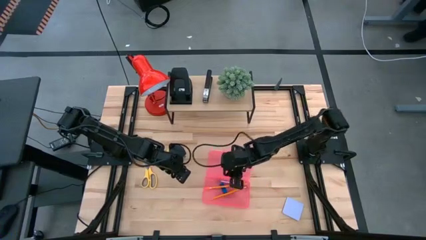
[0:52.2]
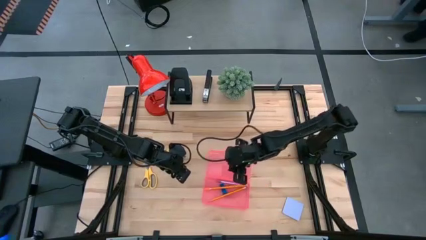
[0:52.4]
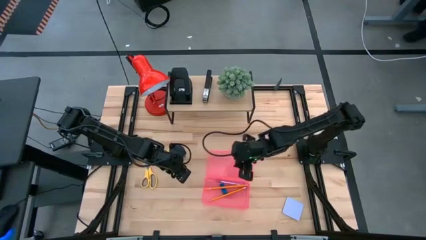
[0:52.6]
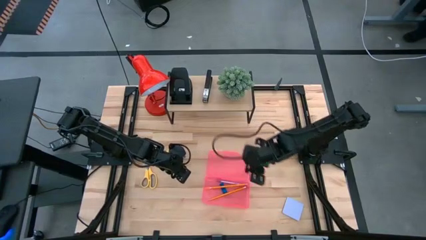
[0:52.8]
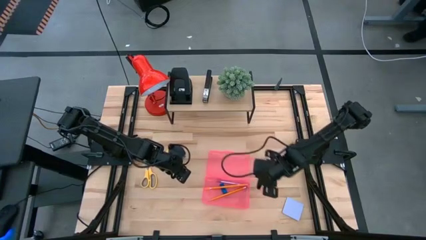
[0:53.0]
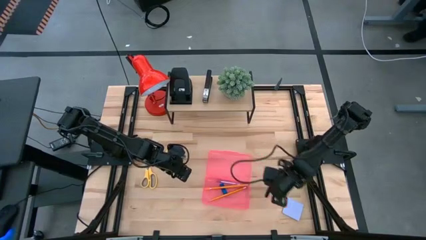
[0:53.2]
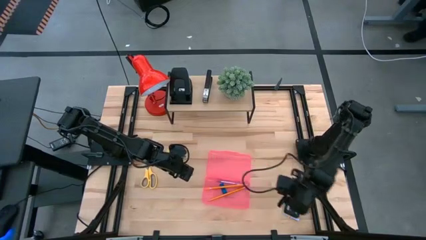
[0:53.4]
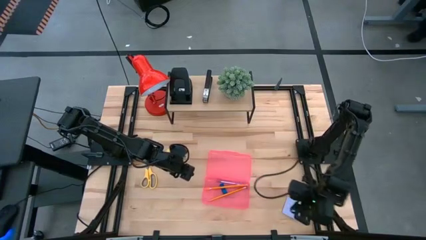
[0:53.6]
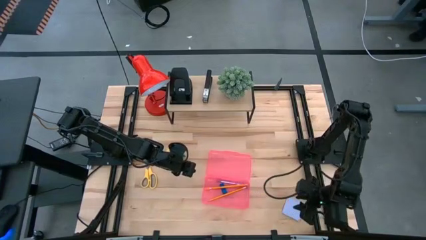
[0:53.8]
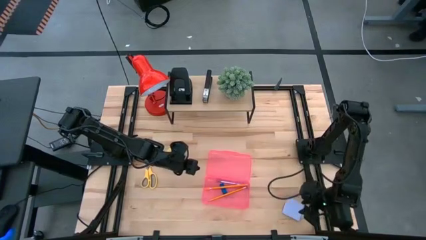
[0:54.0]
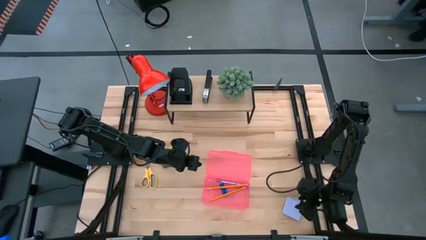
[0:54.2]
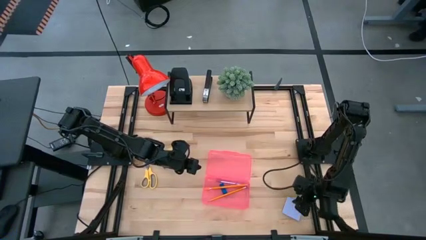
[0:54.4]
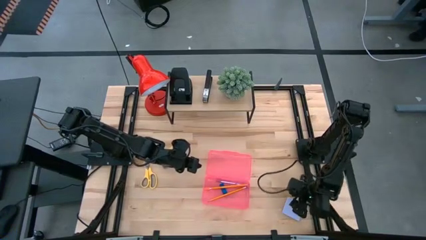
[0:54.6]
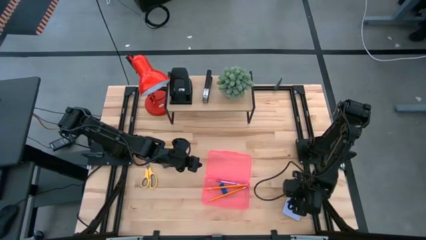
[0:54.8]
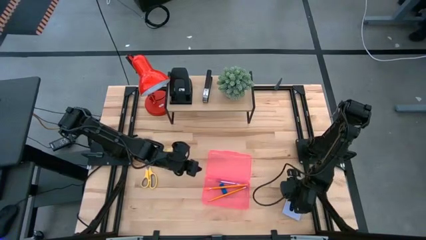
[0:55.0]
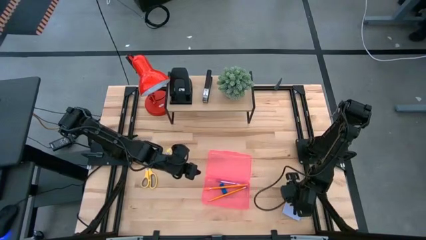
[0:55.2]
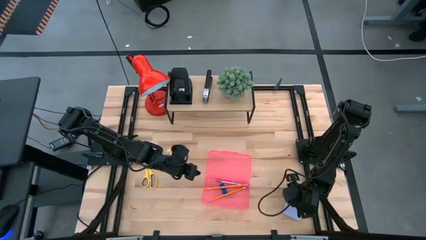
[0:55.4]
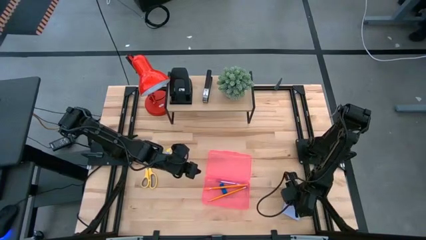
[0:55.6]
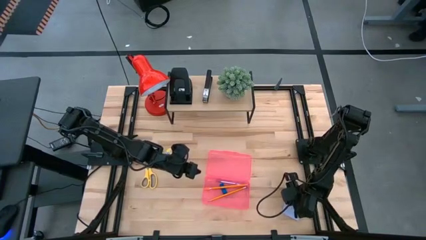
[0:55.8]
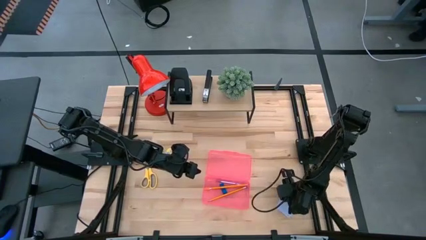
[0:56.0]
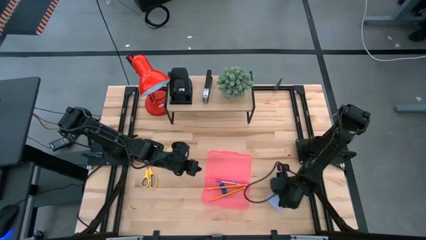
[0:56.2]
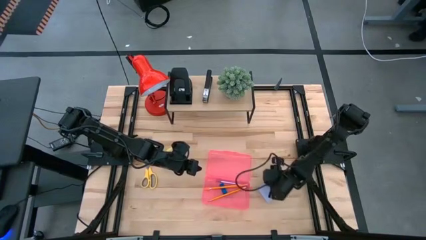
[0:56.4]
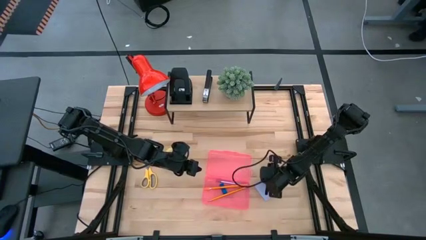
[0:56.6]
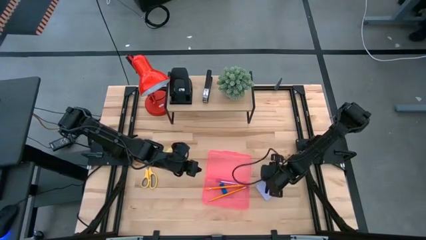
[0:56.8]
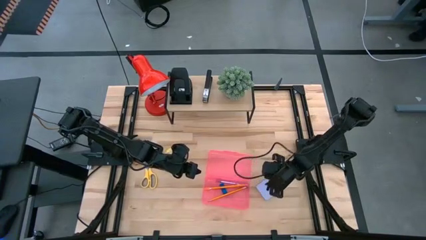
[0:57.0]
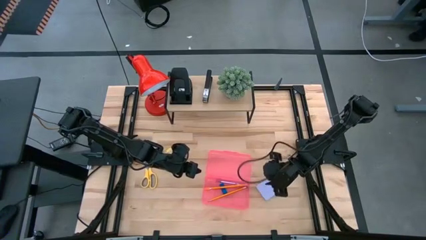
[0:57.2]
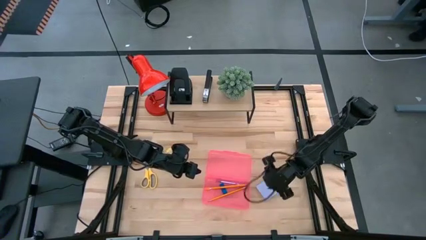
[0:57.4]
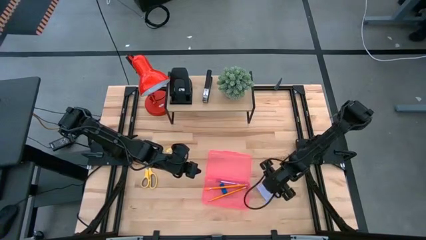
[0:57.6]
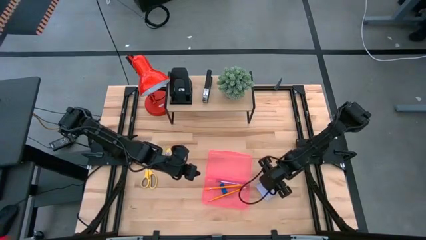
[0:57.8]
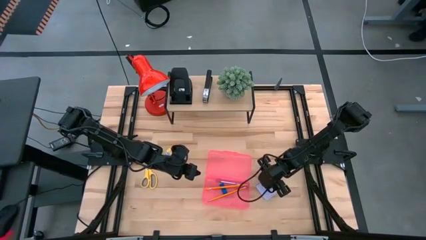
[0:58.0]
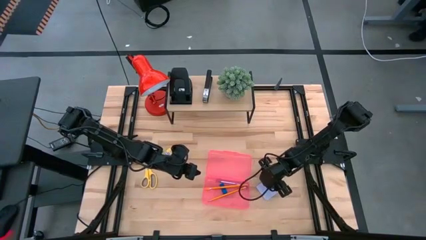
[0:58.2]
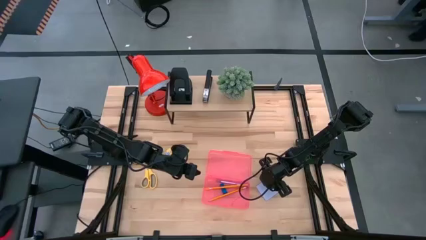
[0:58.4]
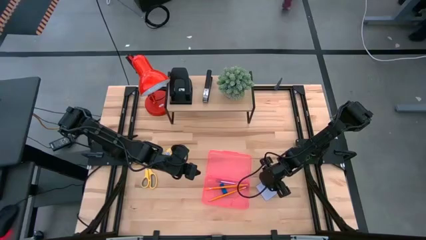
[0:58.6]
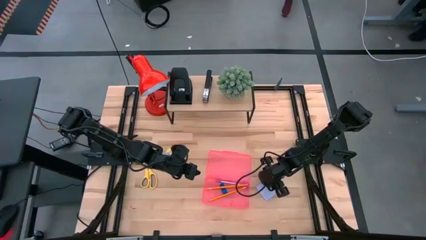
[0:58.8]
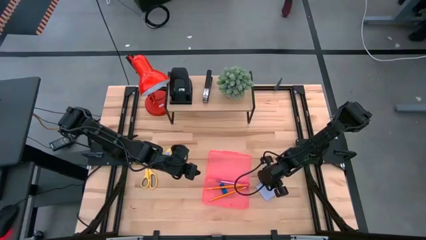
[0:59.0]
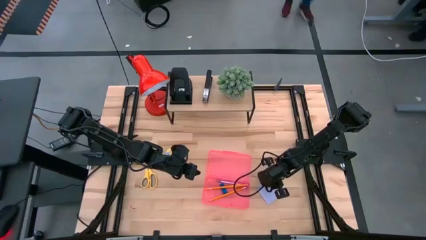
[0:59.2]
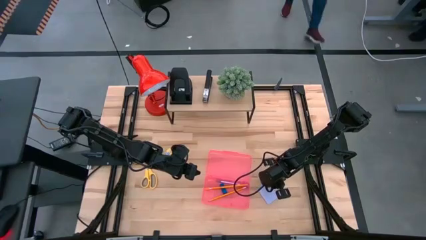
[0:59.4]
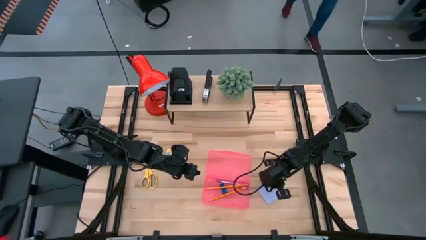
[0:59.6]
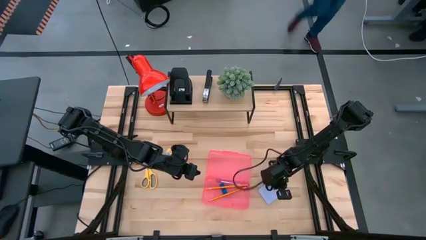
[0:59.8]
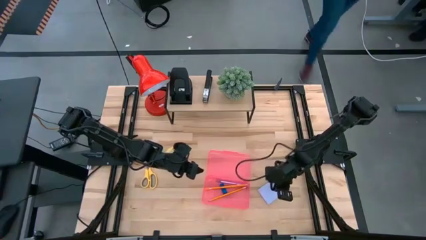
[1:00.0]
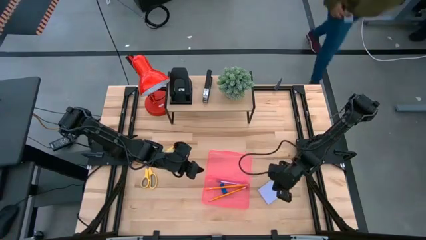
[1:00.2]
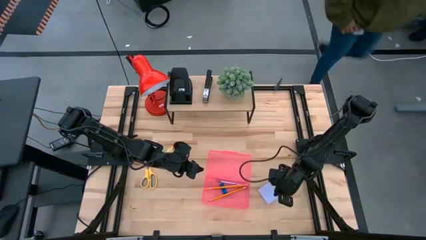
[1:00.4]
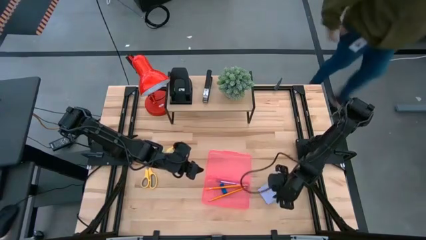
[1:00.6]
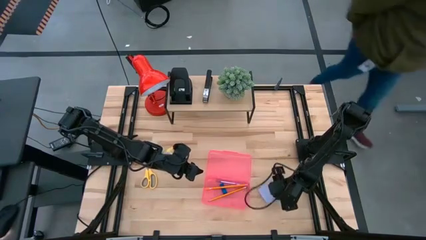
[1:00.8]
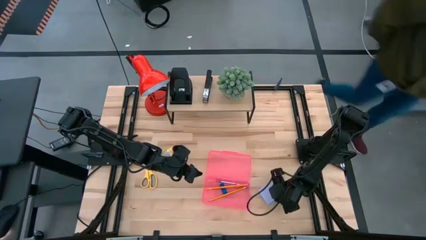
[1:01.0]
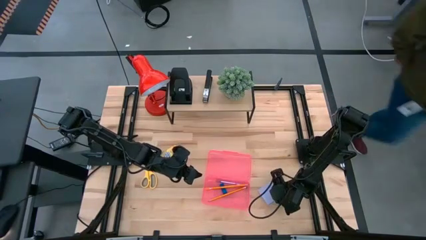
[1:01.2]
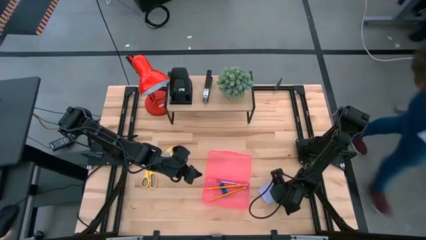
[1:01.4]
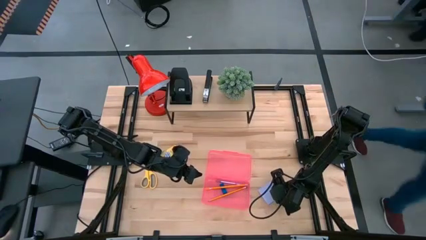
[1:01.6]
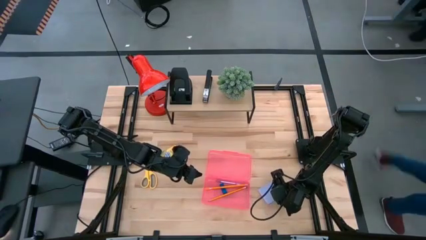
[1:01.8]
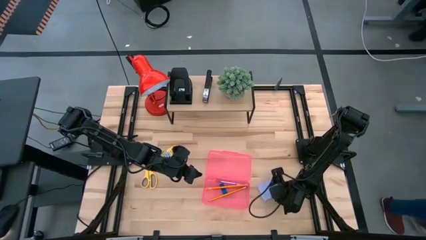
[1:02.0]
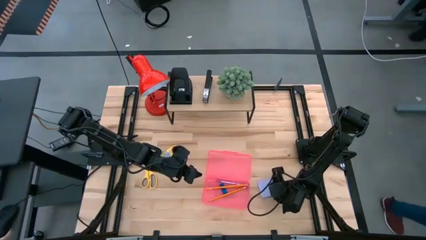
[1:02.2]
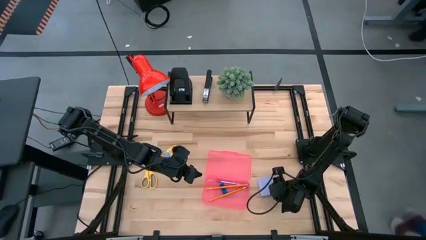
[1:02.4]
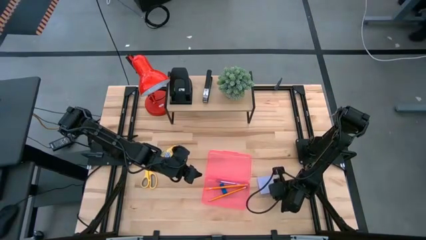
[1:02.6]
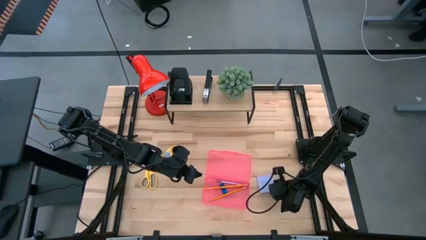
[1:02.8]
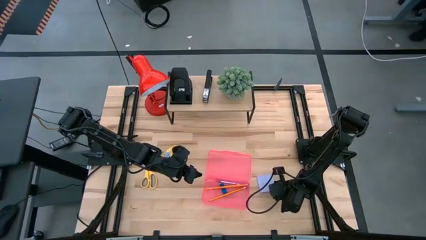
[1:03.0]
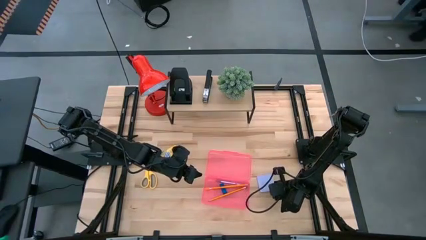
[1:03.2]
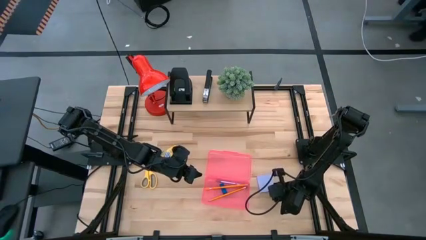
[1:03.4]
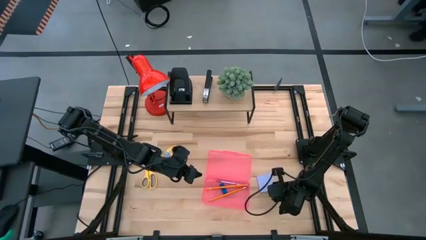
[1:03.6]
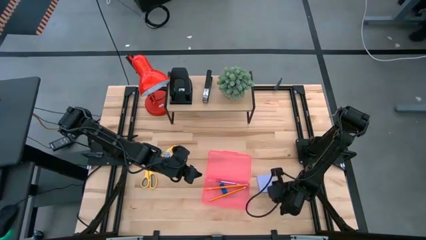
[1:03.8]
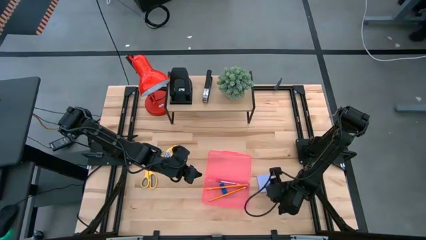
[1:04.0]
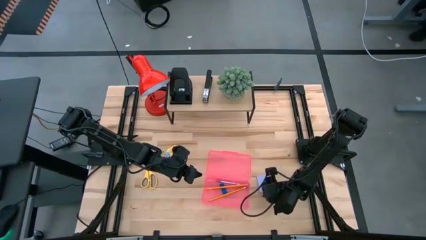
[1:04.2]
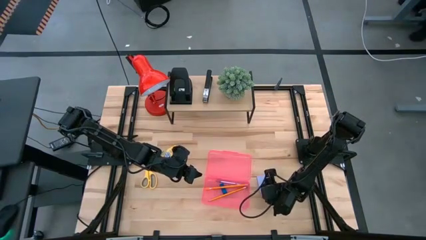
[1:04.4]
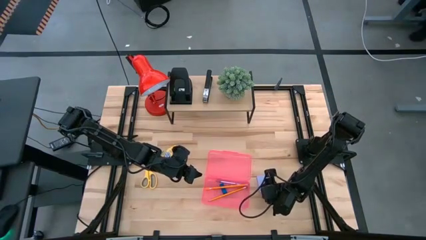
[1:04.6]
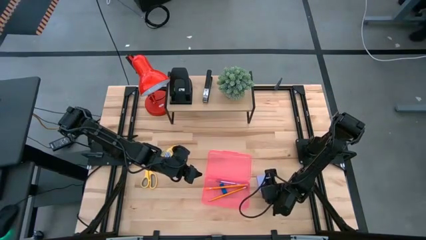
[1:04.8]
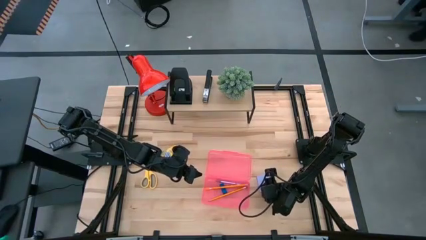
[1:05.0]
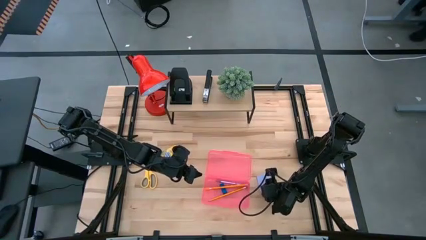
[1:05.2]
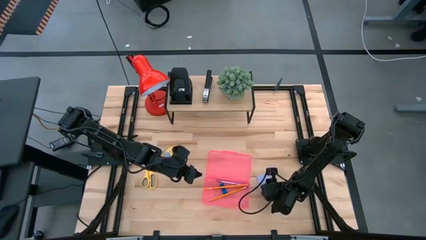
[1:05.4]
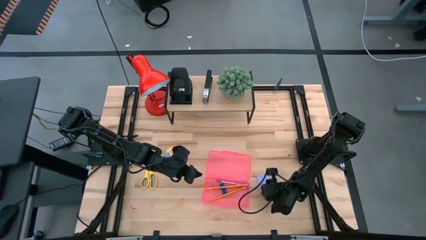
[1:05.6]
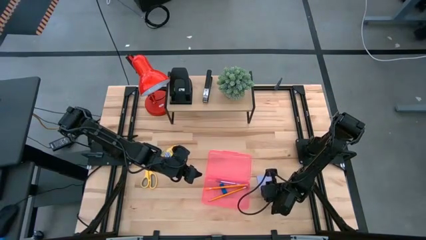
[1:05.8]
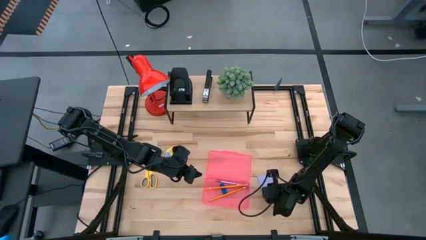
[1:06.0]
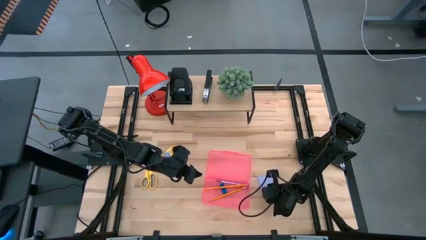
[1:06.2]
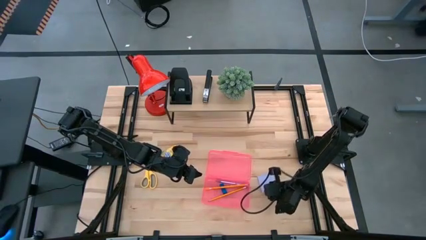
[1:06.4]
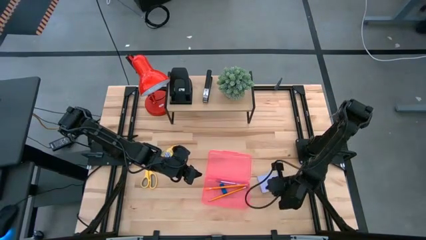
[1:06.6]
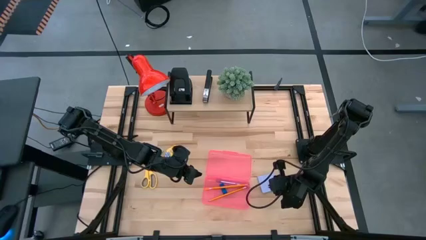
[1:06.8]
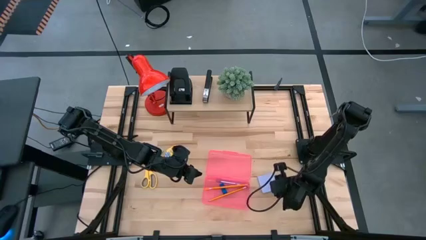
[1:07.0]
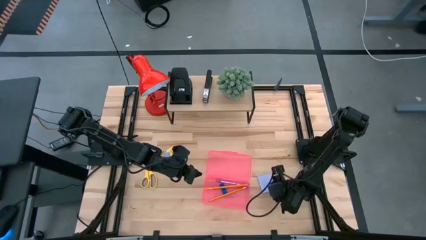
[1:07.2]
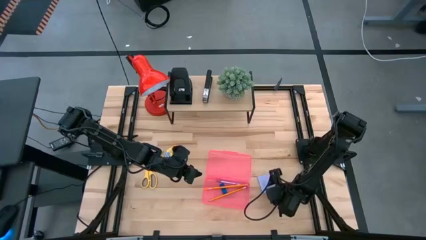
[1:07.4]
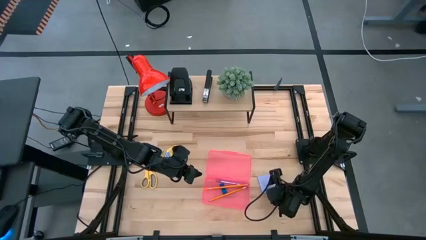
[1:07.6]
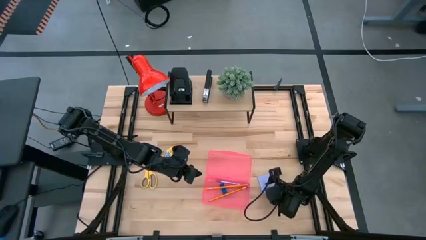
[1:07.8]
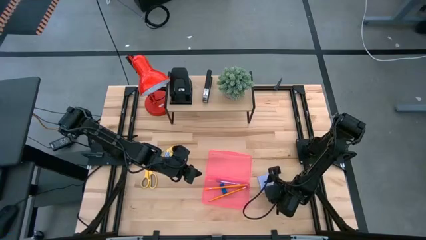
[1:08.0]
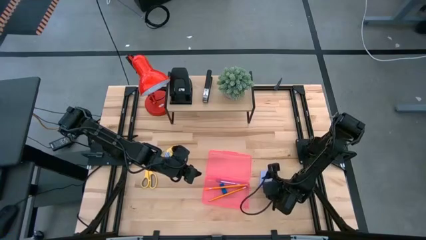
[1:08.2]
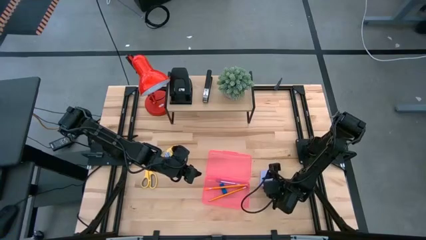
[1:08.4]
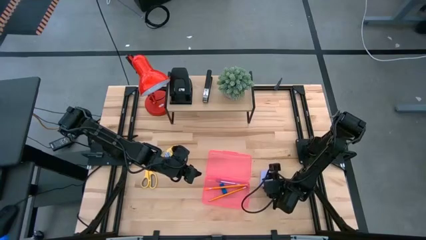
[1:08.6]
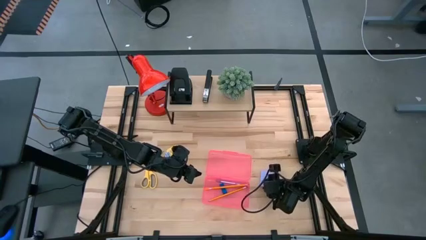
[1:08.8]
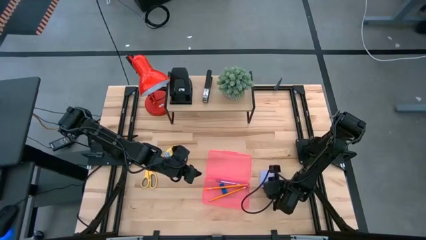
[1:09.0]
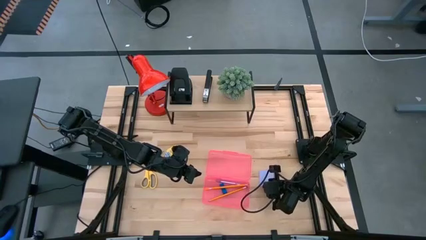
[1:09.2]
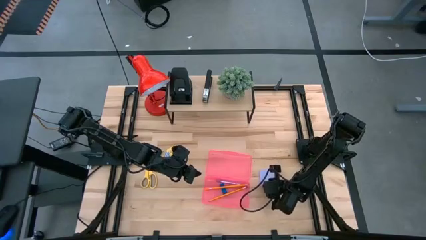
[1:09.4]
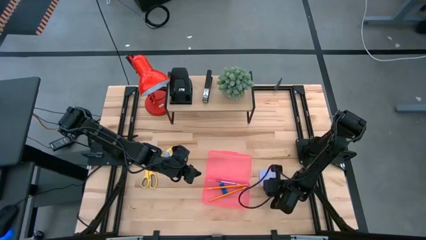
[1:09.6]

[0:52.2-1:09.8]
Task: Pack school essentials
Put the purple sticky notes into the pink supply box
